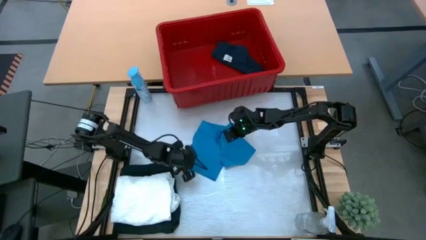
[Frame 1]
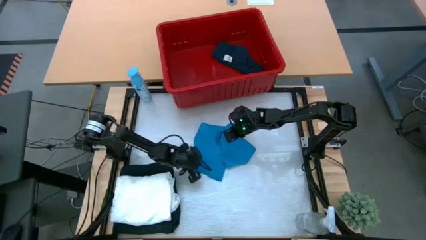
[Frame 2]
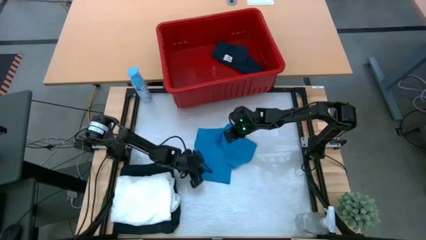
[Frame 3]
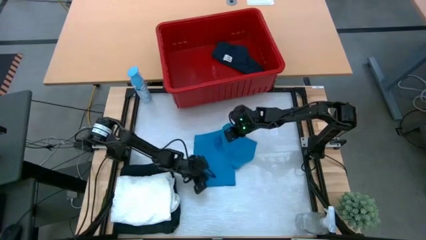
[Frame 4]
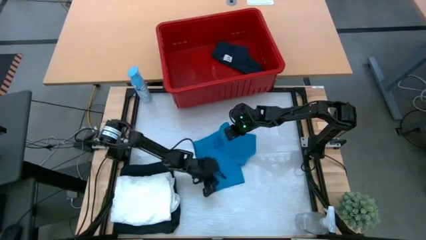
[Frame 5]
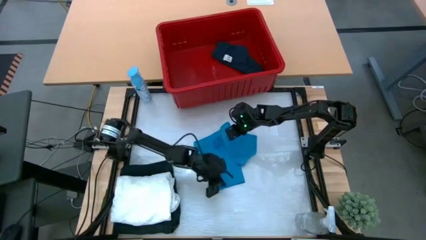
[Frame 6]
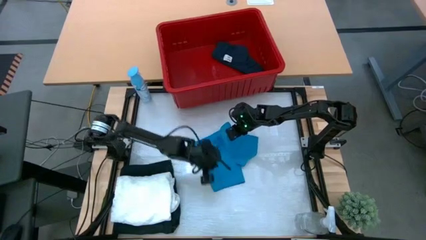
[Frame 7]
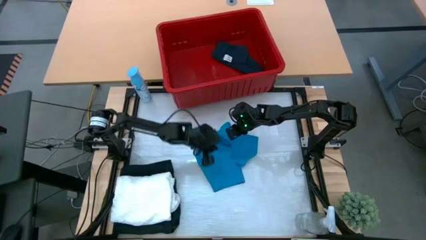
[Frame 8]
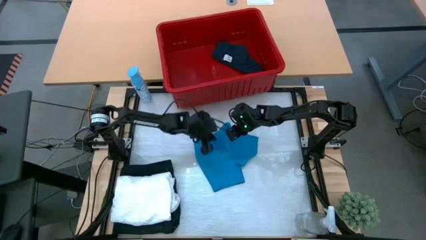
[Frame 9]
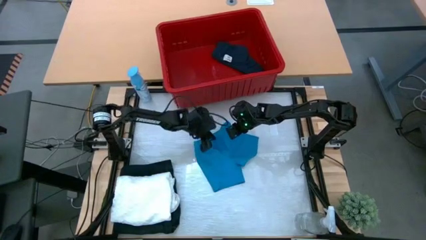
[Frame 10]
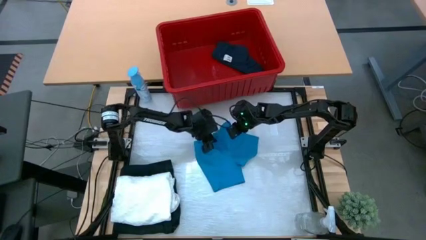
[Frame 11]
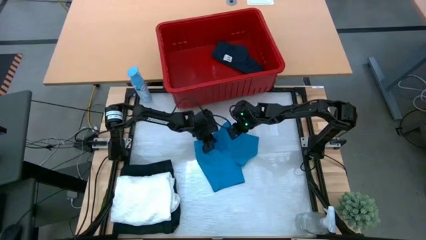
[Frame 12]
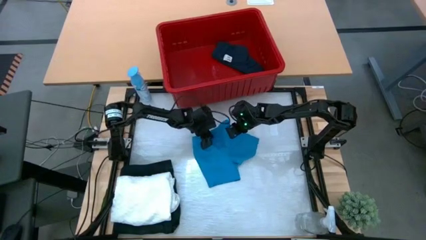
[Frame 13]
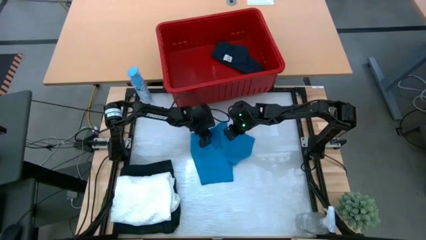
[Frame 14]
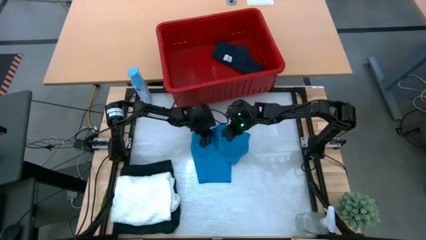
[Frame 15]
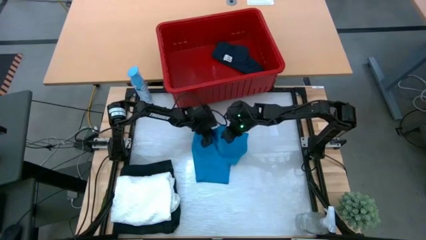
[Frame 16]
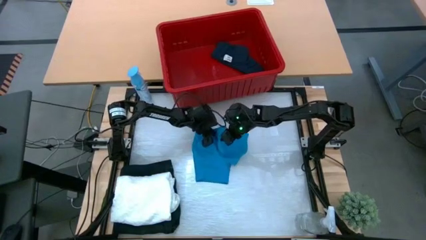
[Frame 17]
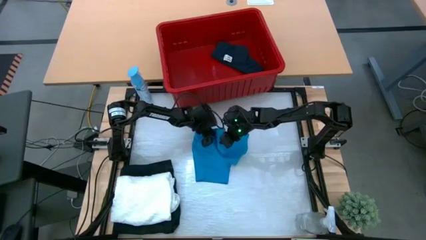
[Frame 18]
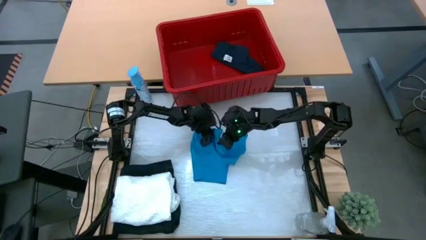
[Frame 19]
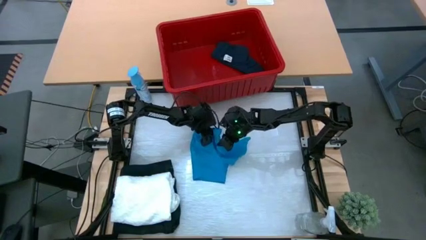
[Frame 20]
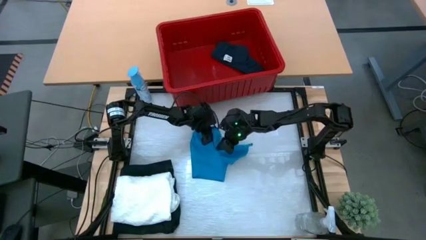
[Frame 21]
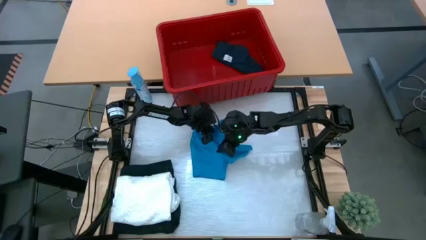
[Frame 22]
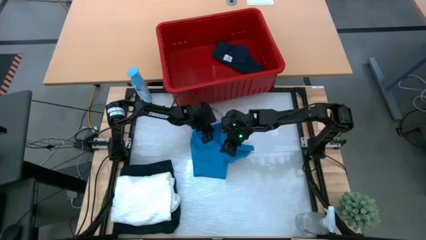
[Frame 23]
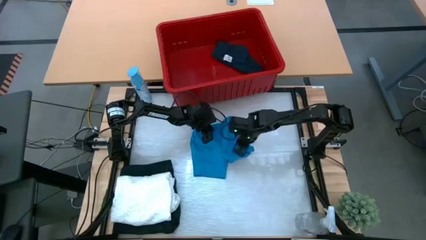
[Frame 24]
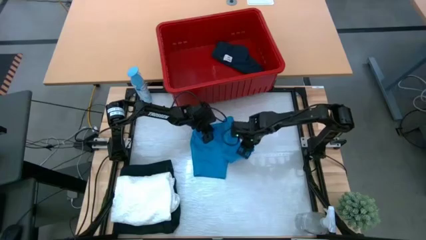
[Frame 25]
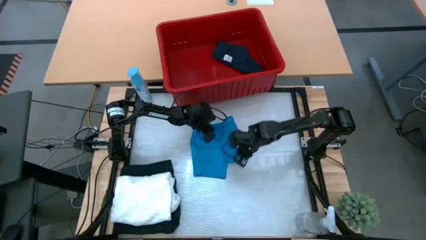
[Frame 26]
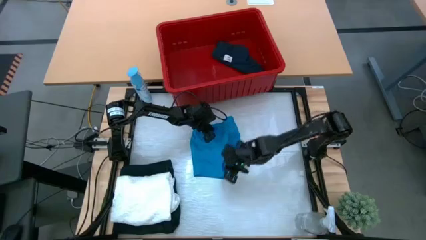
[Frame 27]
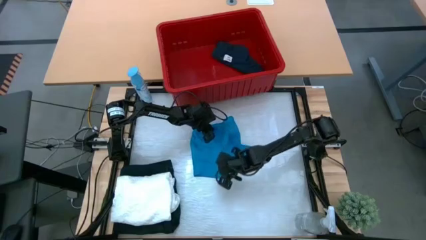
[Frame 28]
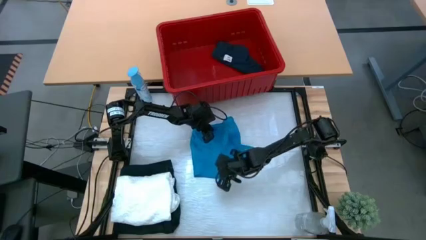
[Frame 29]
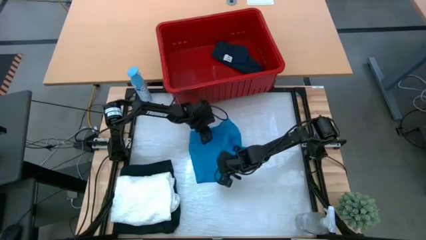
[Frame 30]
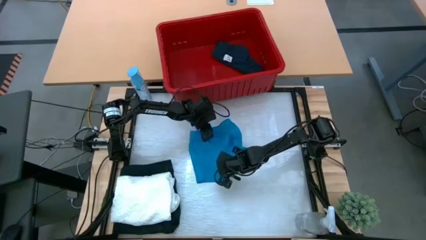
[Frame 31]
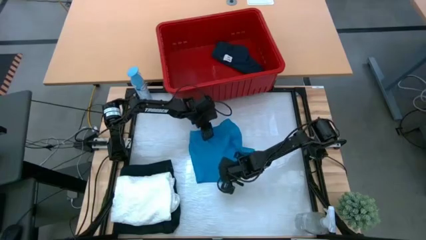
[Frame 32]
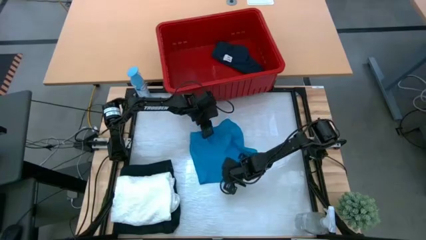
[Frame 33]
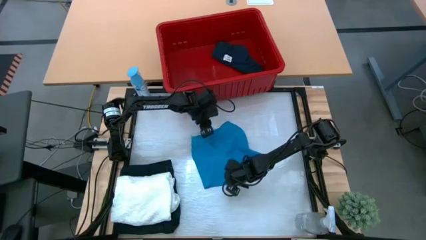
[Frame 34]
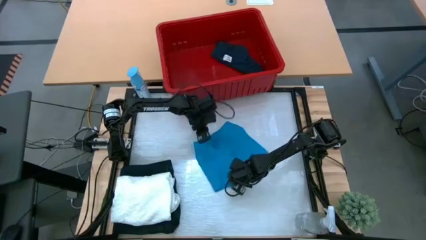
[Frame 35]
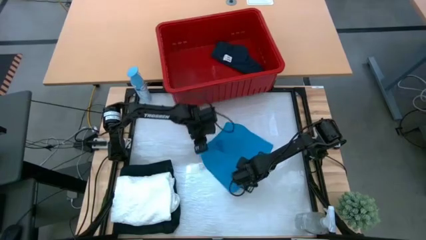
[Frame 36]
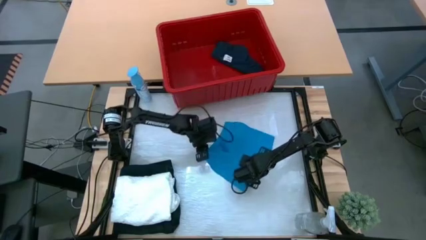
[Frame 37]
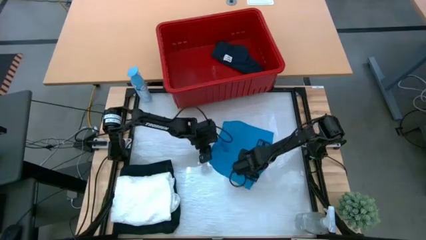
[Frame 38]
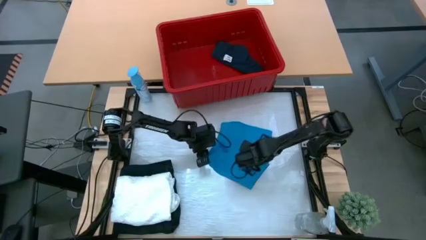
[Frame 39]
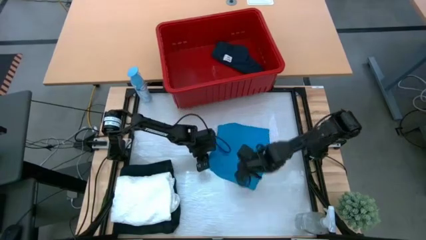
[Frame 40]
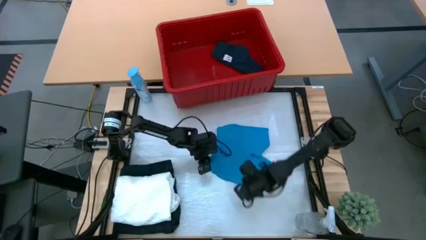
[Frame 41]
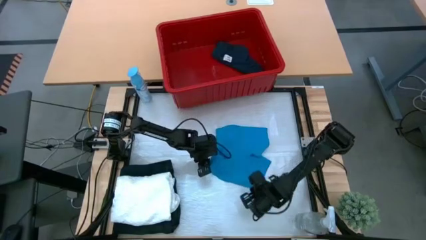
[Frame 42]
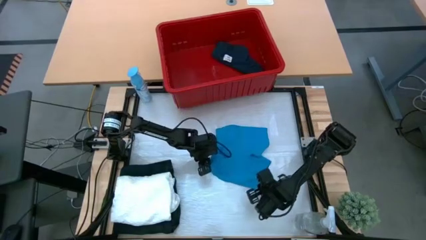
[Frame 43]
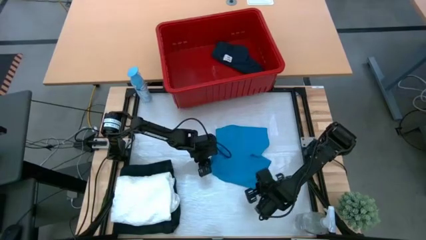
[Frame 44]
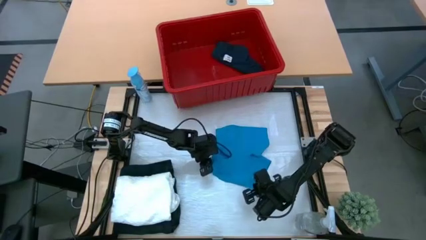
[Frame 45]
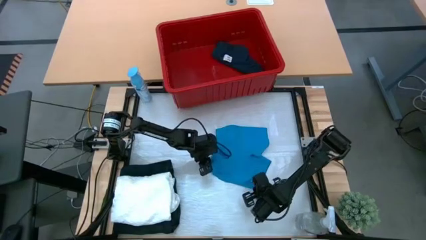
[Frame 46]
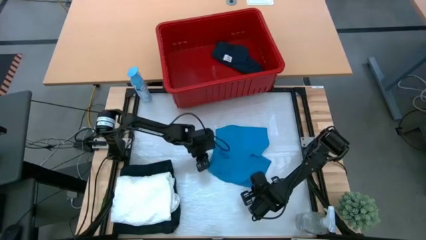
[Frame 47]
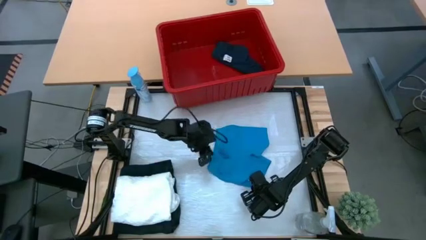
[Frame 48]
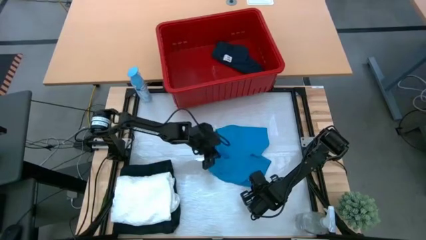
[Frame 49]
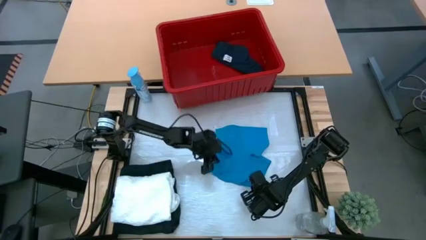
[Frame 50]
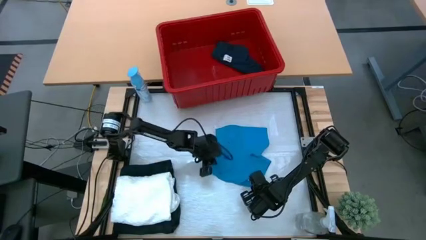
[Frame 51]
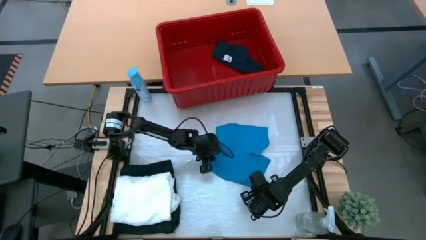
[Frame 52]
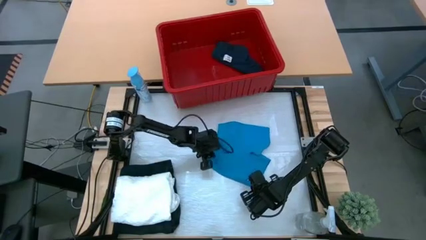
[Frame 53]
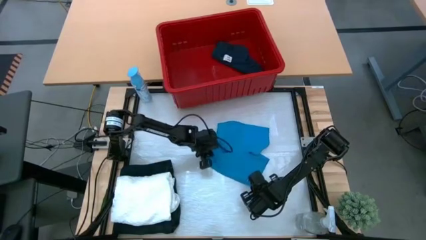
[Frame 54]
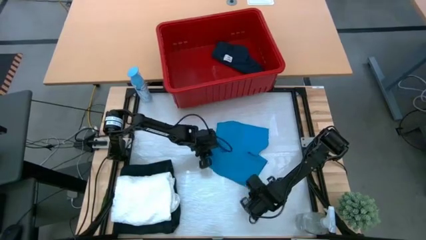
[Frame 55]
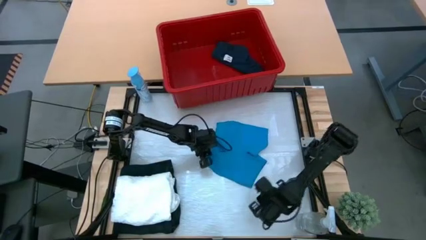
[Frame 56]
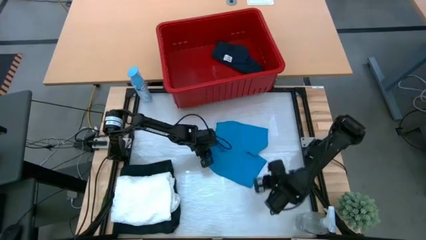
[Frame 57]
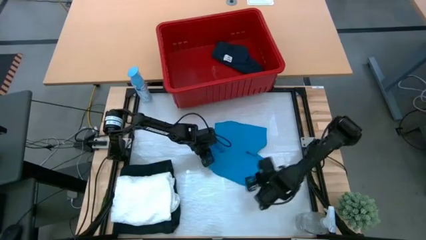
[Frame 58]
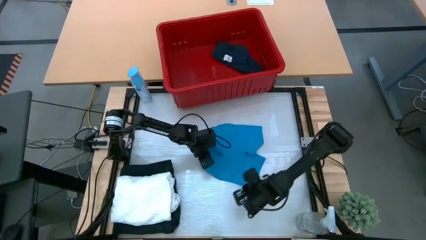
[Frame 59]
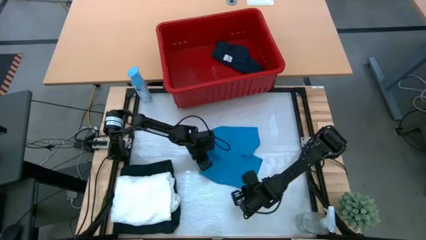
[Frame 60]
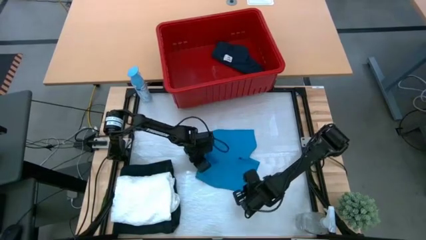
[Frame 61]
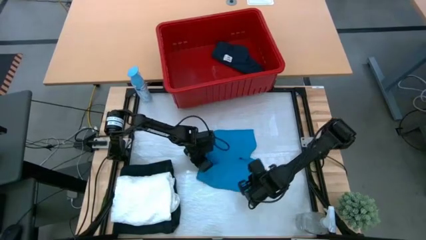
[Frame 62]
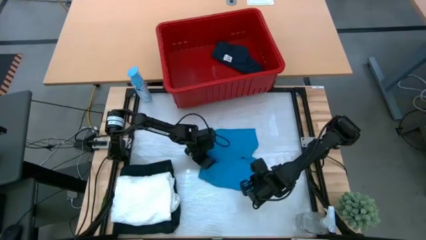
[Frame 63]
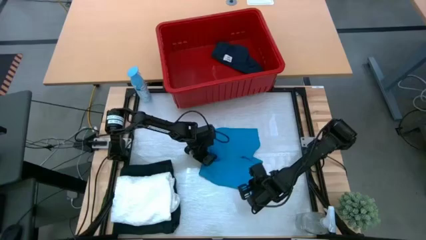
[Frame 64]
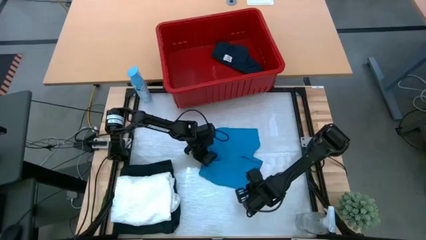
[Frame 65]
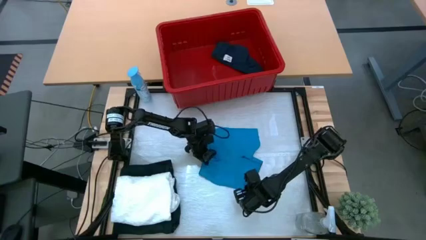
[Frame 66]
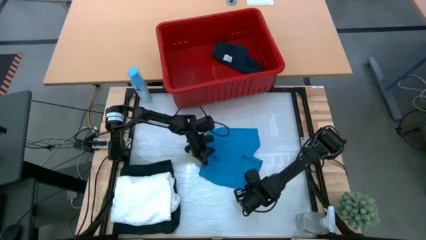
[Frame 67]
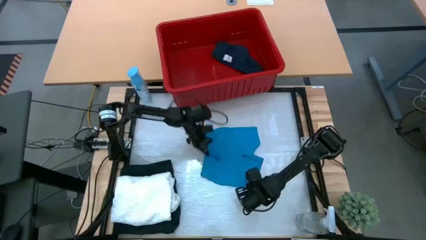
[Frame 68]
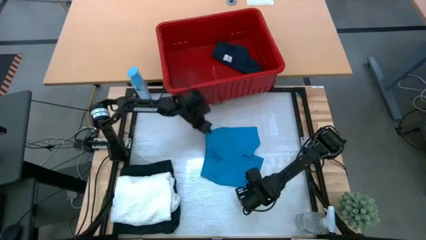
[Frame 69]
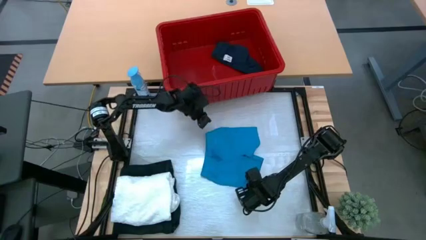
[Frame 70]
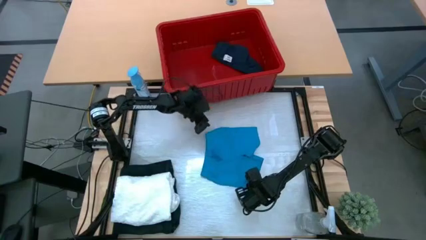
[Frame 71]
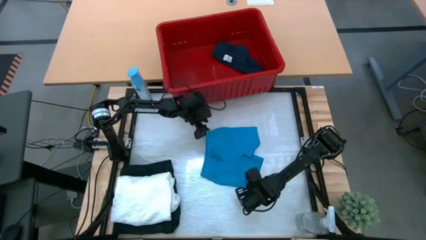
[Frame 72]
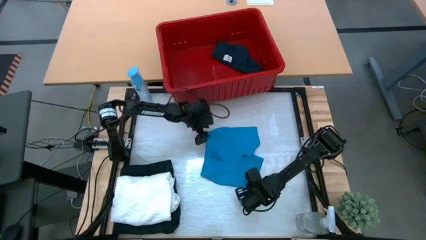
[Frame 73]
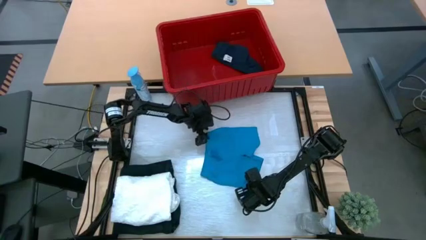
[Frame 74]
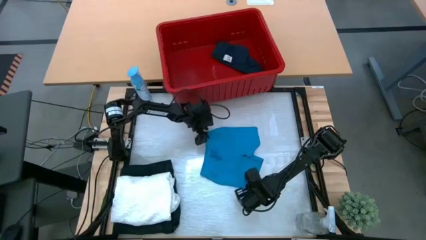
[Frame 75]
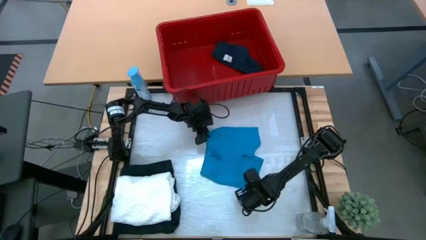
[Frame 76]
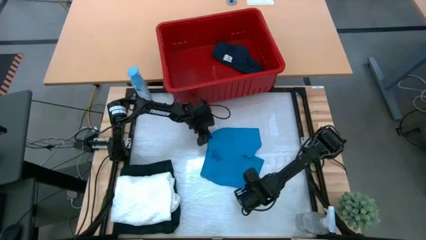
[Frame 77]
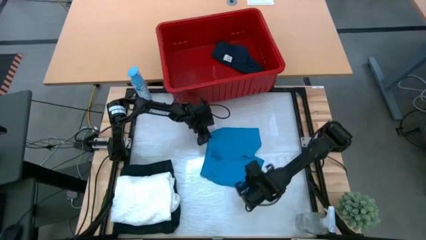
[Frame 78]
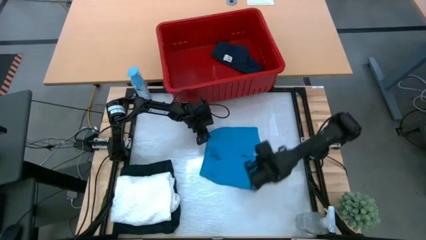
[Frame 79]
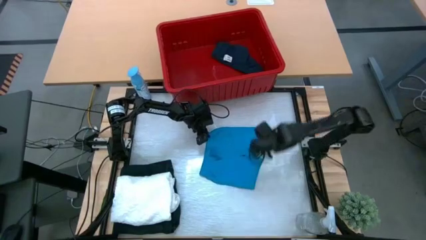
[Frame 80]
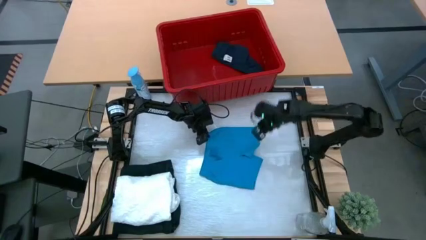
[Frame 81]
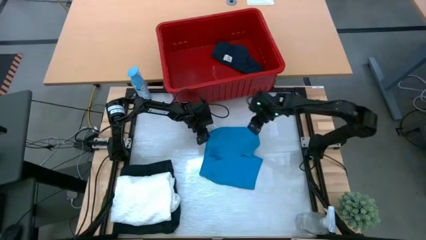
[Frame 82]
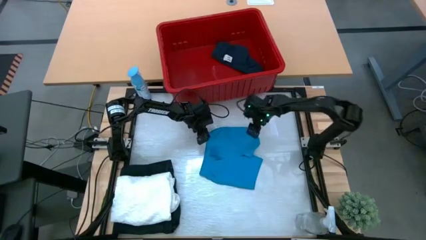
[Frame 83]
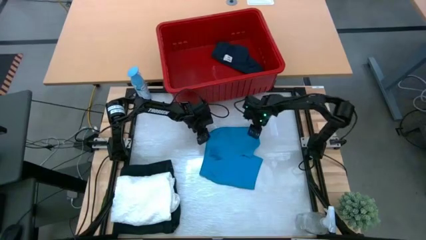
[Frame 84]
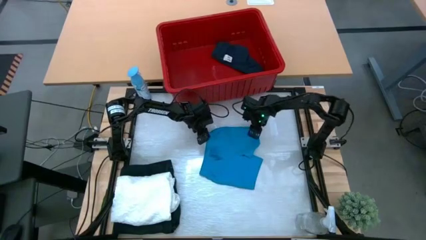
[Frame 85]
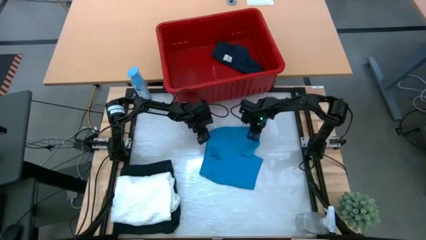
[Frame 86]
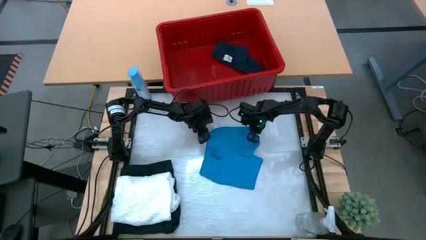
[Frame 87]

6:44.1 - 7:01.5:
Task: Fold Laundry from Bin
Fold the blue shorts from the red bin
